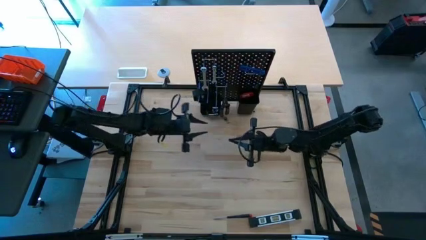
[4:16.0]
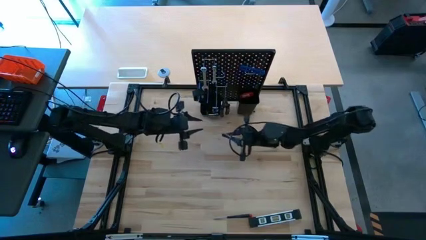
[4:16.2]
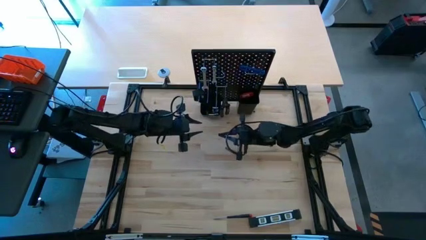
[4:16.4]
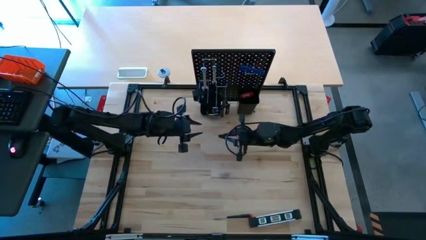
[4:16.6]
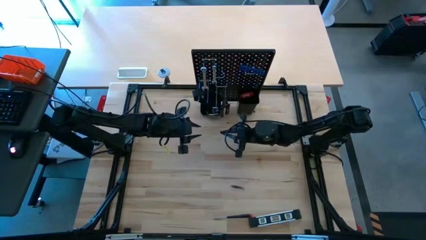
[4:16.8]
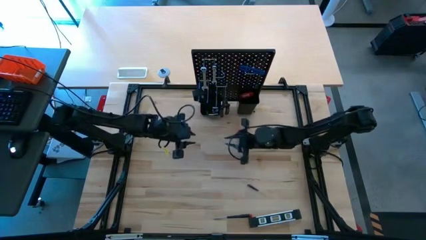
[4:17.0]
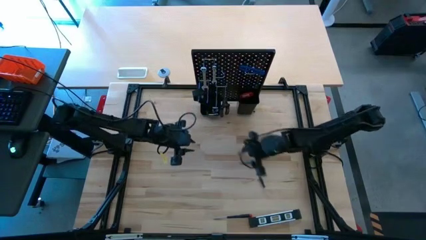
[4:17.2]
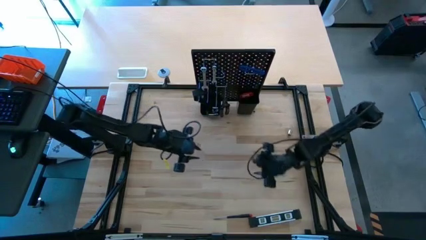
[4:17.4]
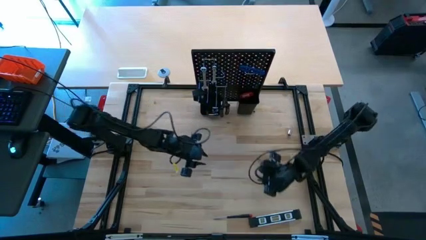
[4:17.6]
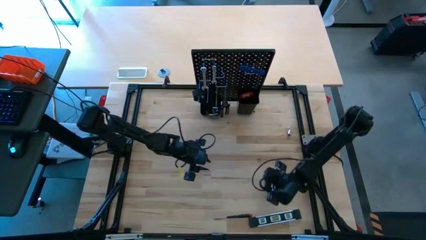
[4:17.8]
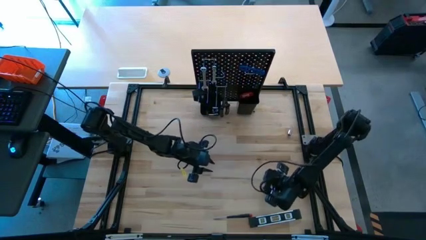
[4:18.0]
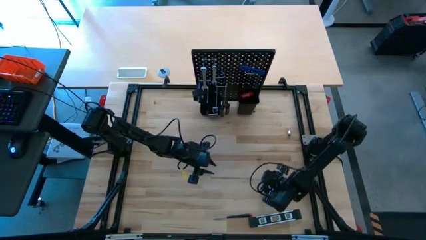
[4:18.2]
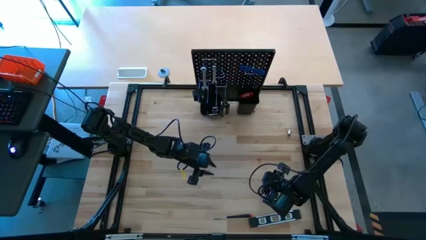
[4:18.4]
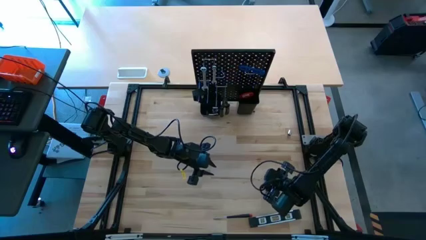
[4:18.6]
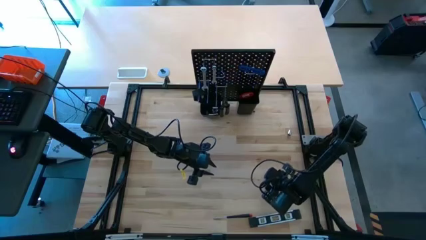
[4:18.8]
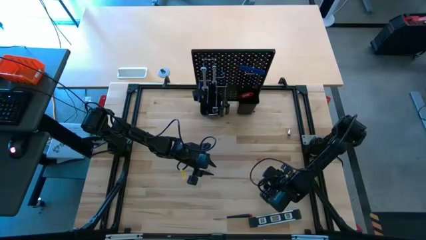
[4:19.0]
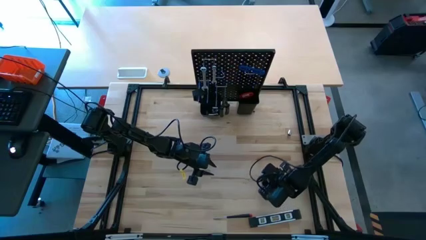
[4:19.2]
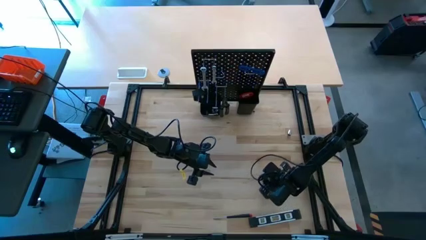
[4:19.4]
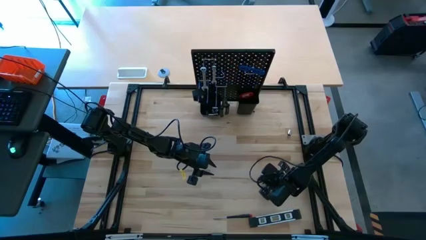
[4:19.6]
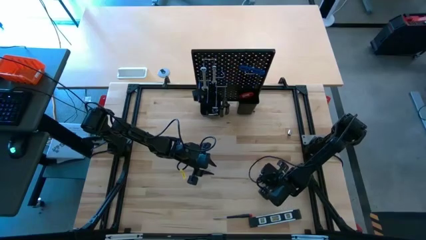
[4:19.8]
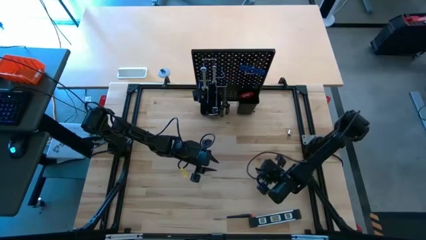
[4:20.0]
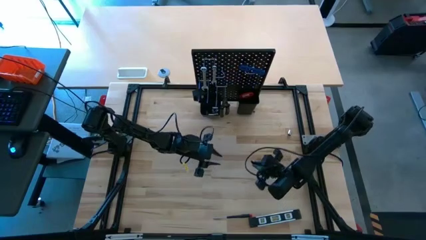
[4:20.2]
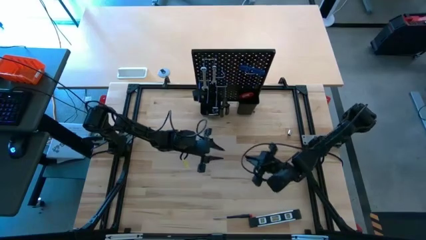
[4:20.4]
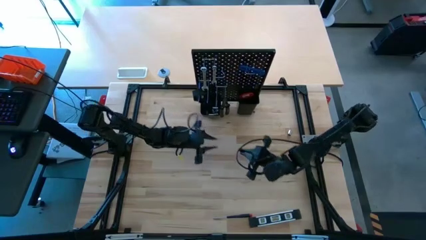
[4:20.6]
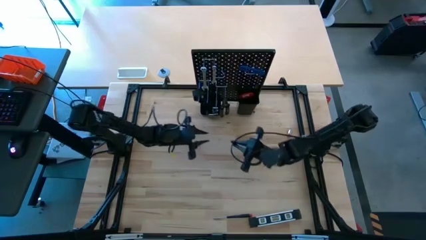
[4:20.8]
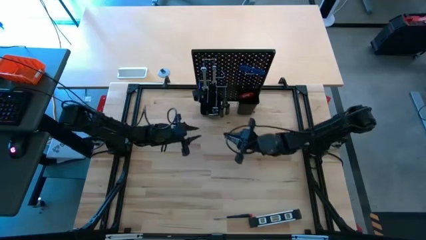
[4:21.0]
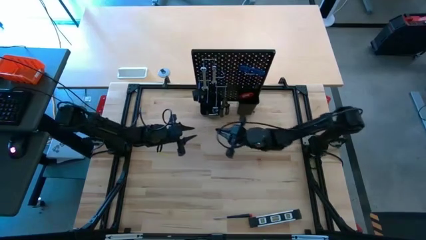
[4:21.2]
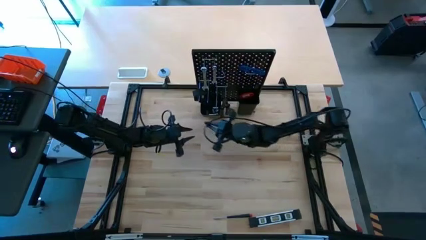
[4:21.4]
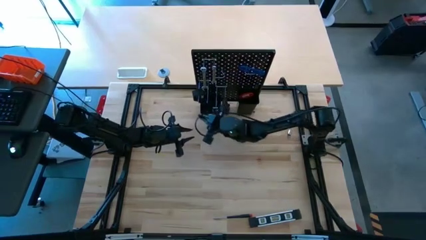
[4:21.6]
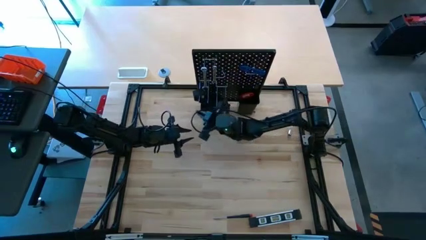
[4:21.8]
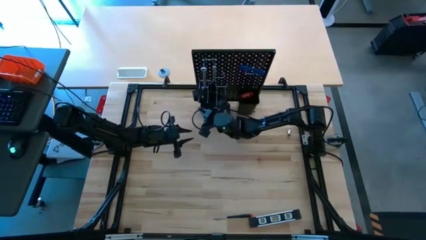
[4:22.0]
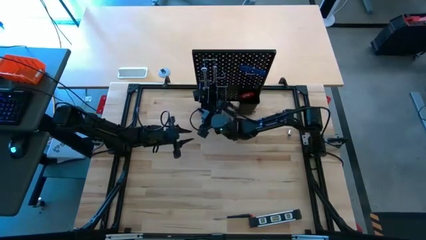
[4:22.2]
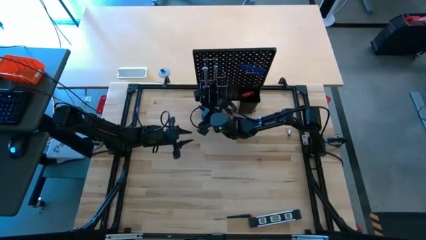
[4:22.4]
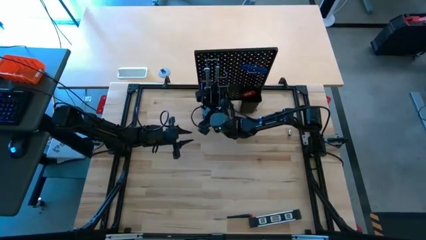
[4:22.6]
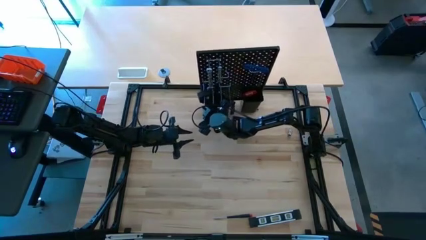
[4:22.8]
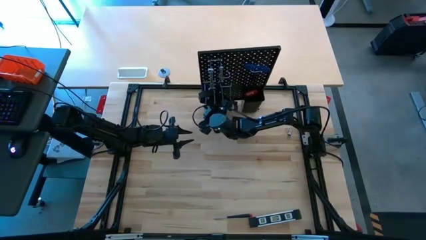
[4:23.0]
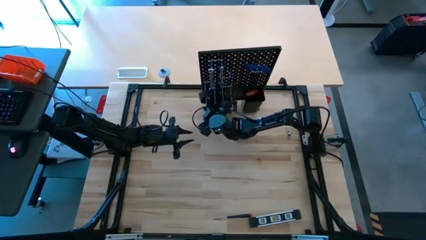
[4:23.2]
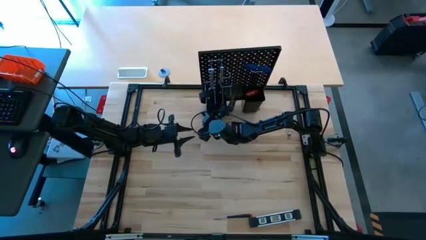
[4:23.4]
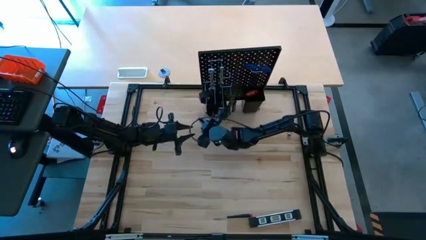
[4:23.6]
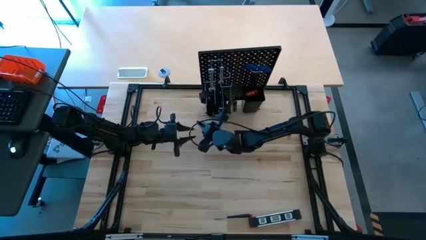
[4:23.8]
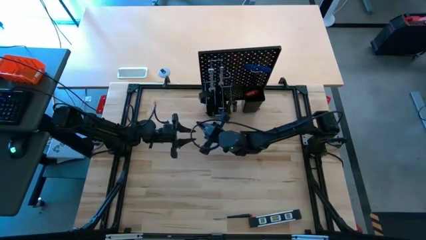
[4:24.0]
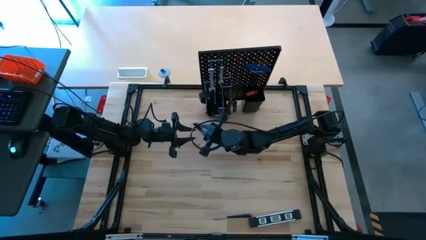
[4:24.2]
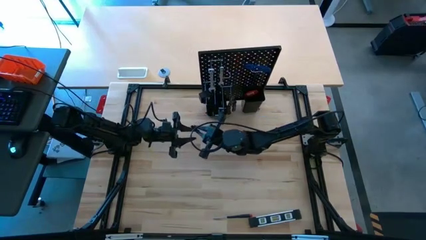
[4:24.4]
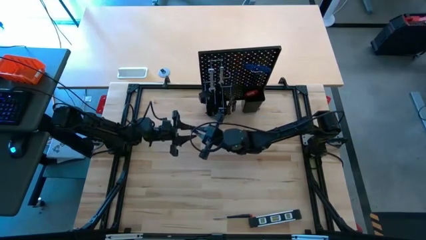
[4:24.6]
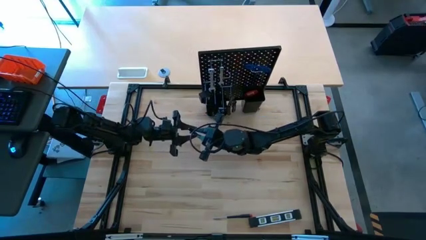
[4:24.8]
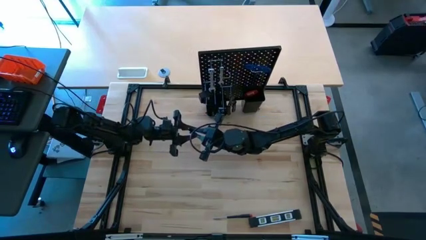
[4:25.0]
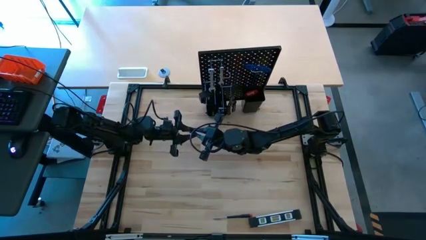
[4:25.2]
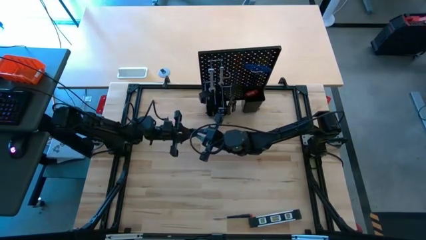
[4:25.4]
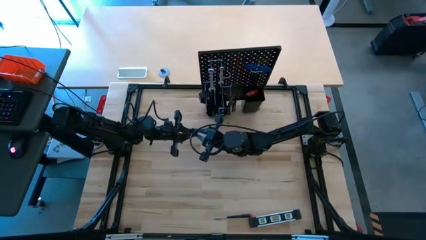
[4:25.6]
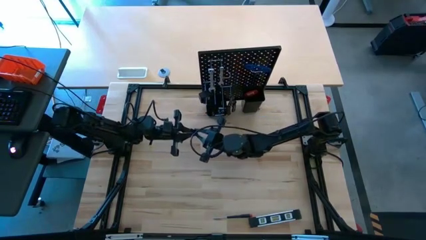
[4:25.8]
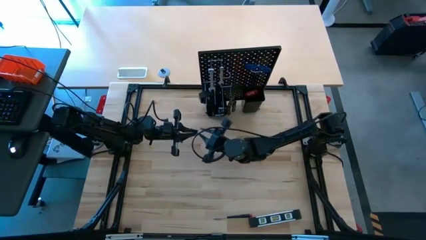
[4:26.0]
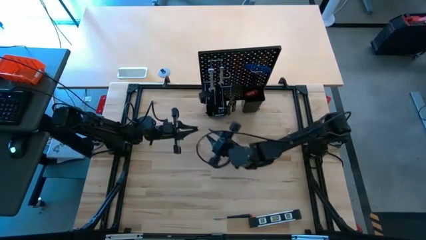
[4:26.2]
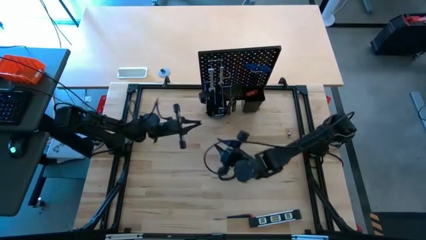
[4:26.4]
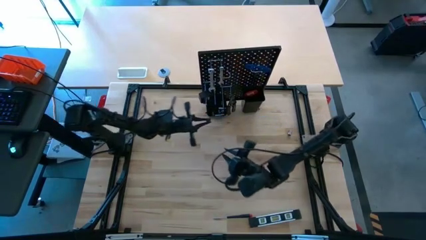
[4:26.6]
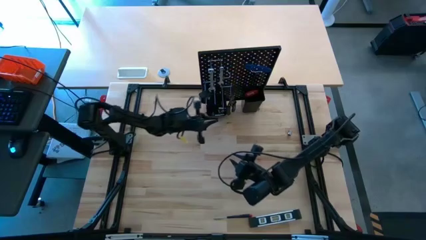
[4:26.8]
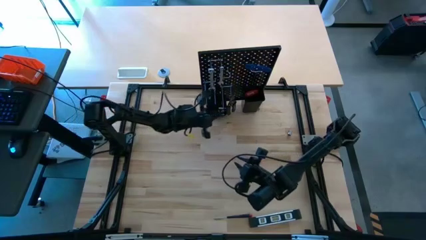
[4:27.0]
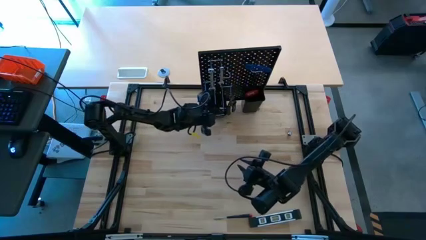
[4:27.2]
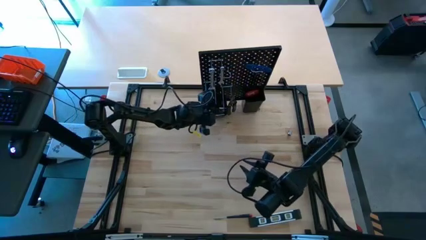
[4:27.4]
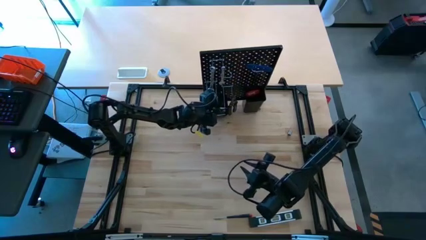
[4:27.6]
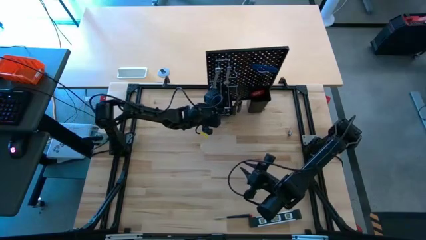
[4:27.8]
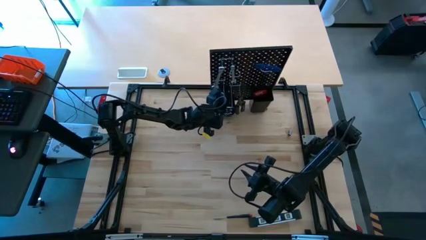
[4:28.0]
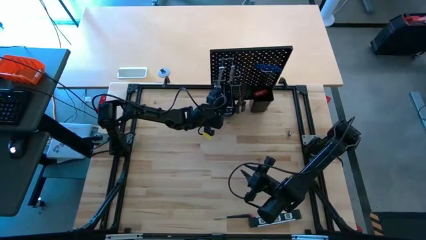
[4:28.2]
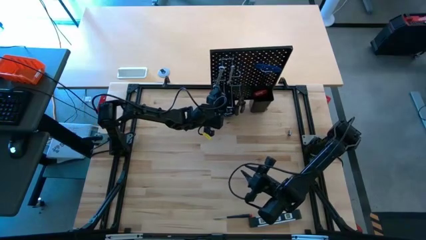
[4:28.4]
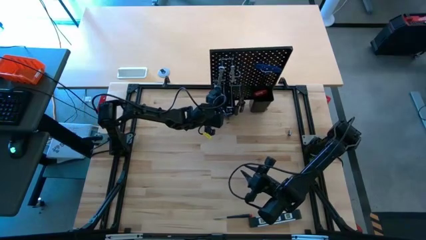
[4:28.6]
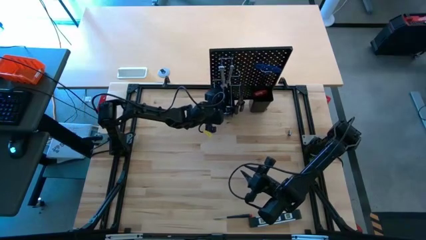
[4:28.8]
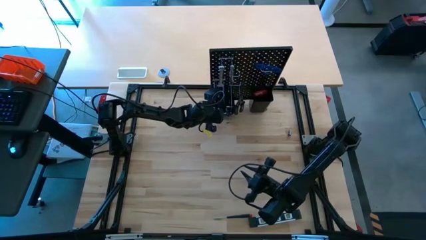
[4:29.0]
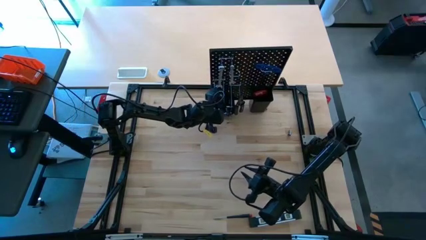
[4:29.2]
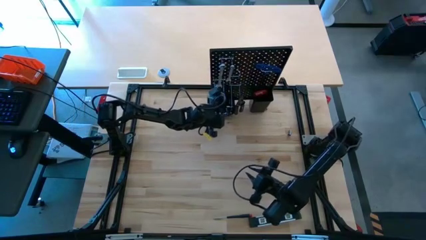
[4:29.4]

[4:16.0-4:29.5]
Task: Hang tools onto peg board
Put the nut driver into the left bin on the pegboard

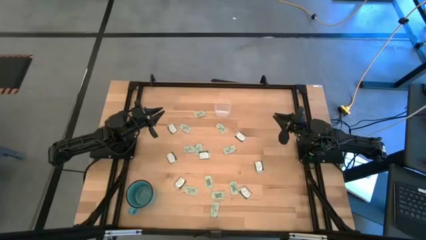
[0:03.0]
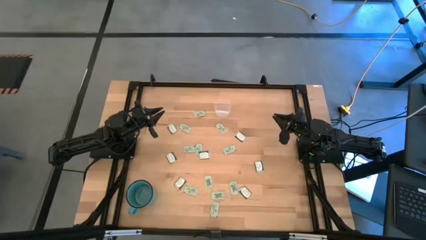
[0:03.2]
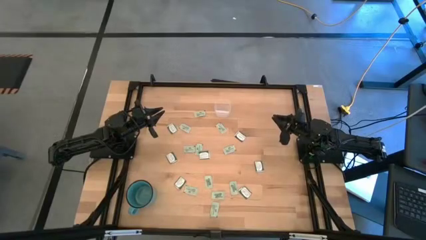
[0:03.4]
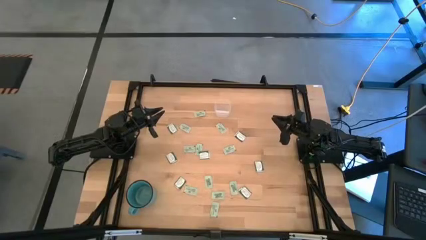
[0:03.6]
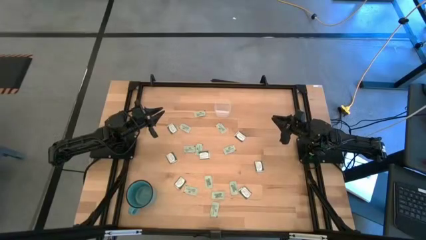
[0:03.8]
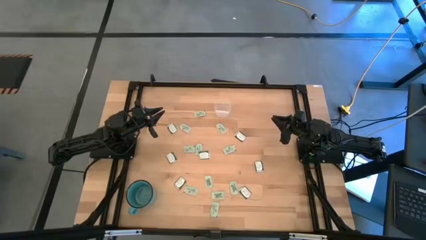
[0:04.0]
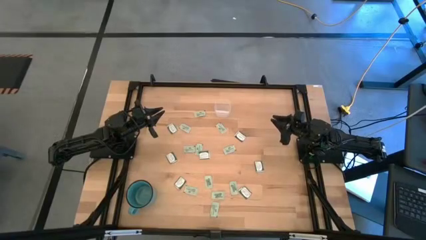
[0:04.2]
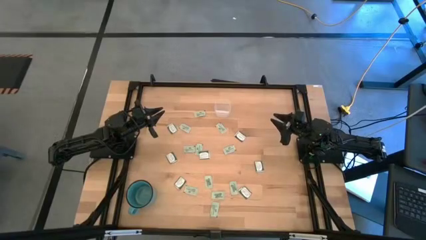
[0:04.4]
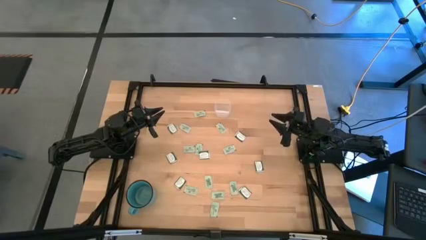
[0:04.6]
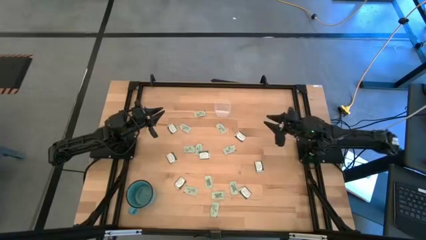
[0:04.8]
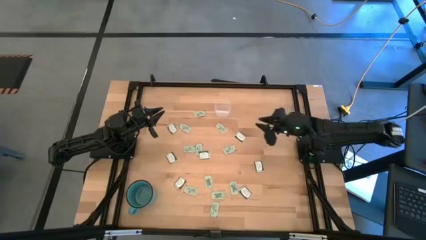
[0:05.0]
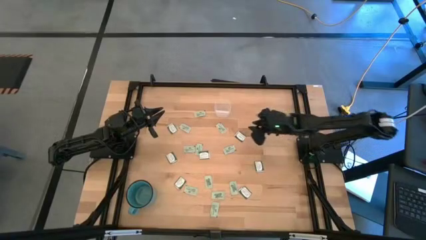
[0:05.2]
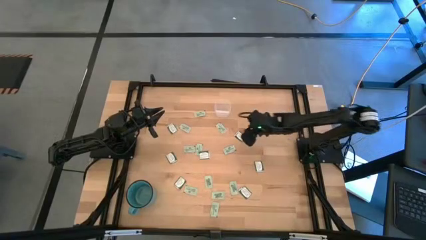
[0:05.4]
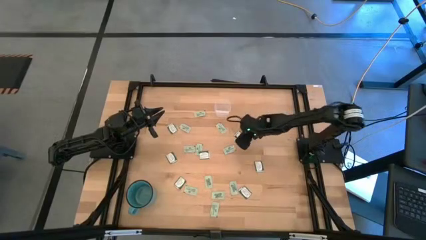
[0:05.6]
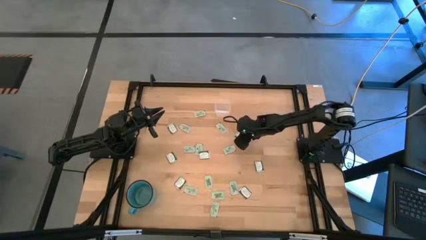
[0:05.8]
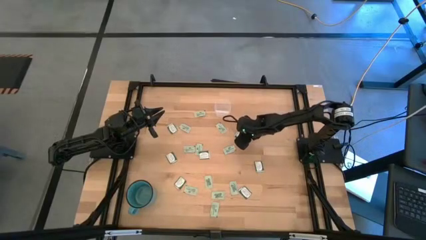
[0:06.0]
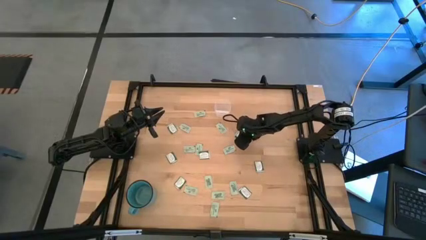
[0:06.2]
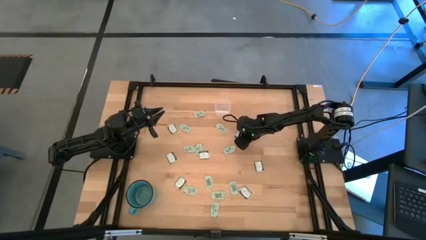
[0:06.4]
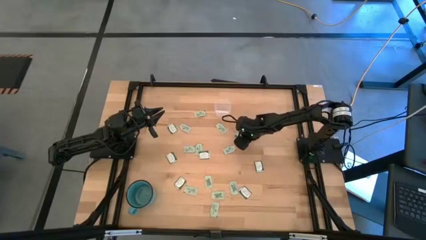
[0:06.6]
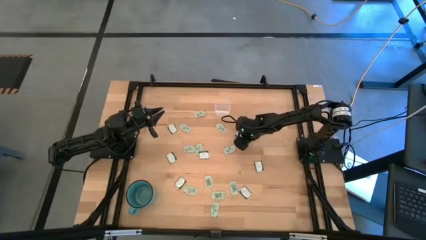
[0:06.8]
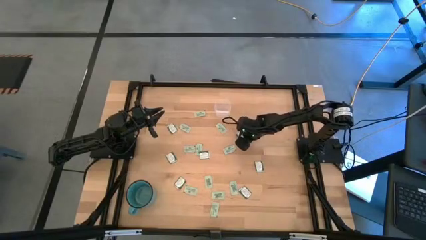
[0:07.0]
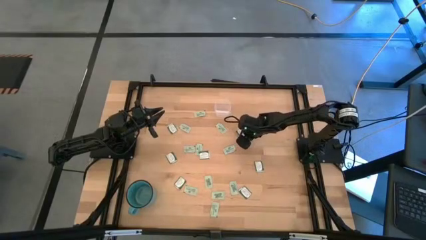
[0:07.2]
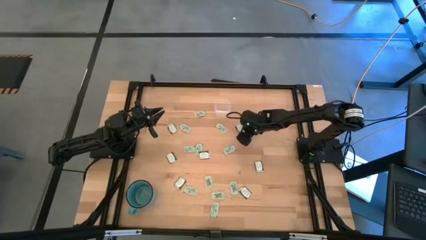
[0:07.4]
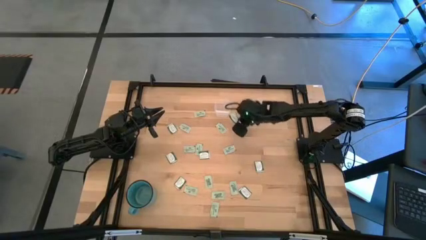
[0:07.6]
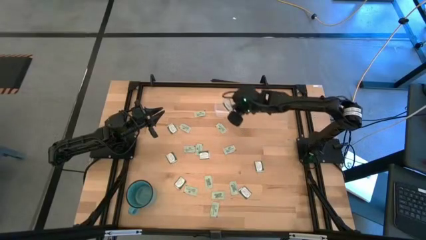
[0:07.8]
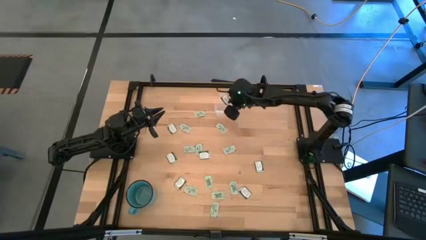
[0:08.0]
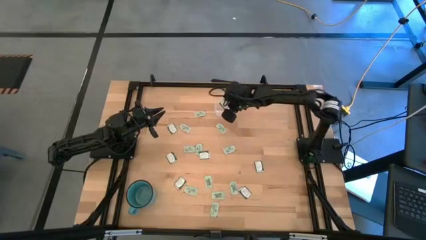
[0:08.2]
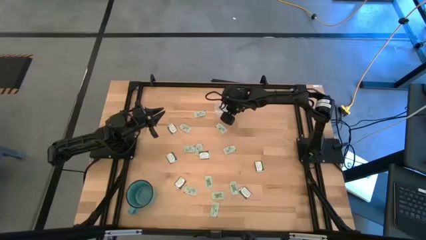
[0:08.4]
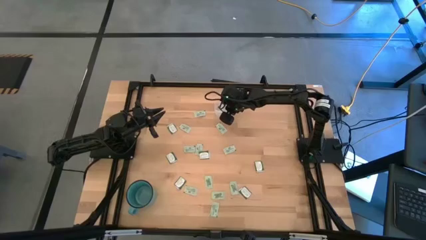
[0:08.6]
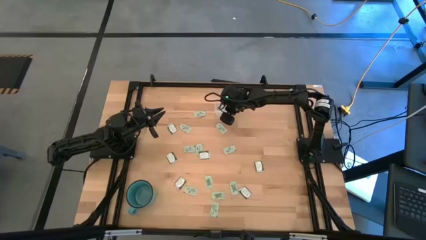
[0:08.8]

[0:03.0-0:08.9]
Task: Pick and place items into bin
Put the green stevia packet into the transparent bin
